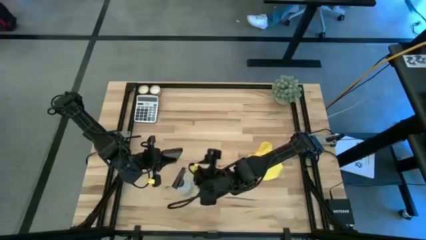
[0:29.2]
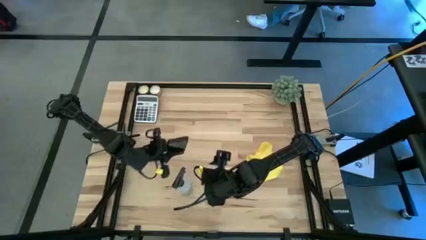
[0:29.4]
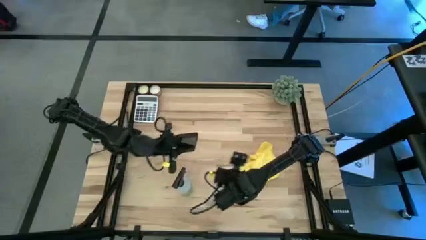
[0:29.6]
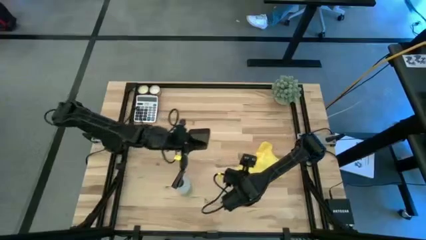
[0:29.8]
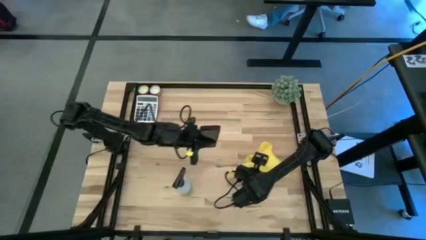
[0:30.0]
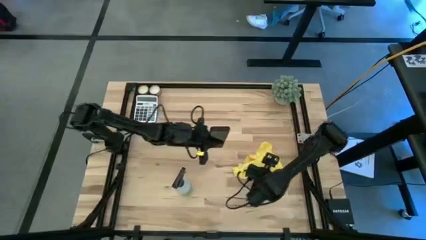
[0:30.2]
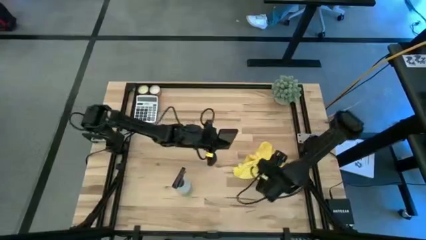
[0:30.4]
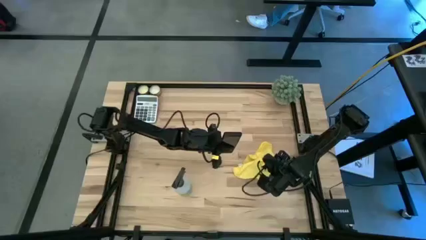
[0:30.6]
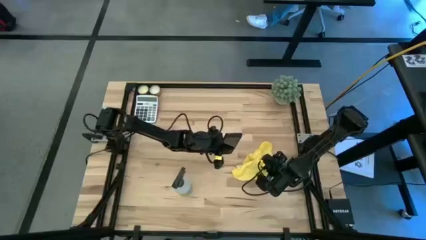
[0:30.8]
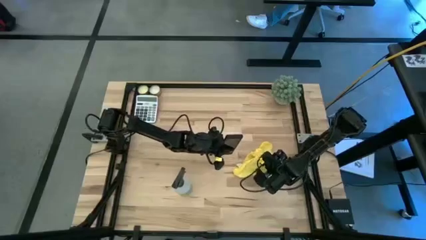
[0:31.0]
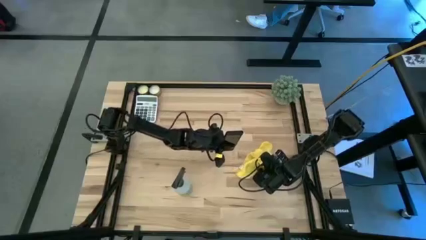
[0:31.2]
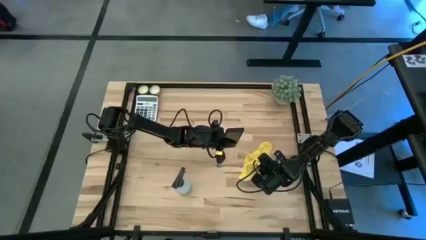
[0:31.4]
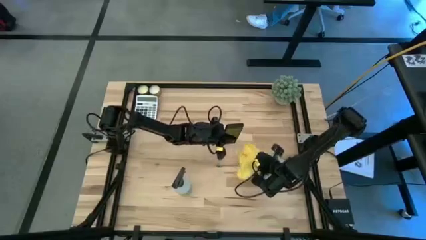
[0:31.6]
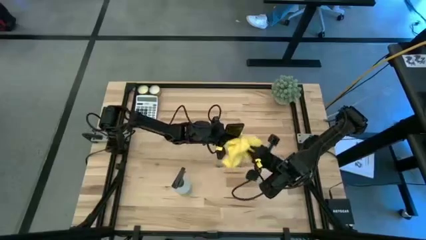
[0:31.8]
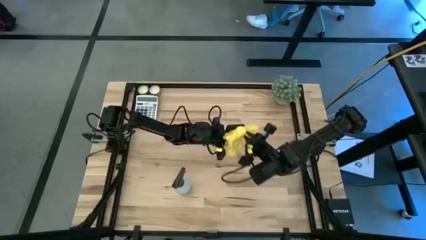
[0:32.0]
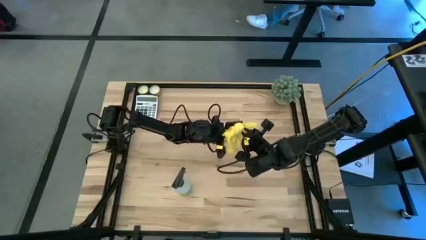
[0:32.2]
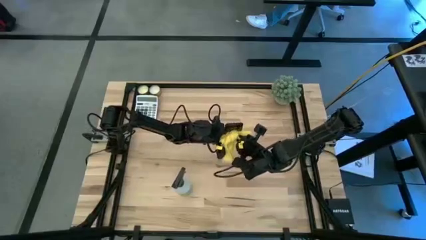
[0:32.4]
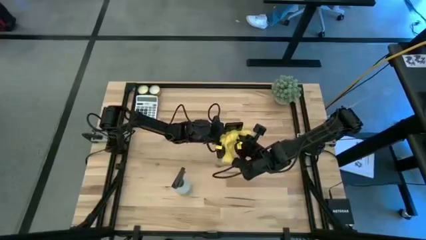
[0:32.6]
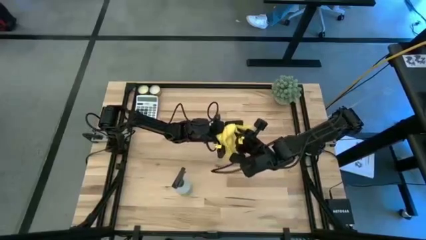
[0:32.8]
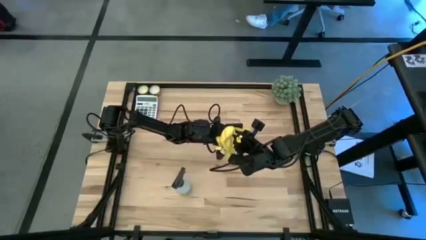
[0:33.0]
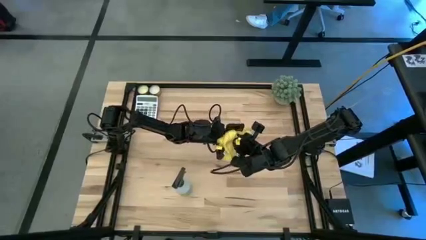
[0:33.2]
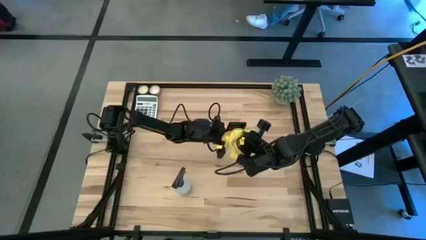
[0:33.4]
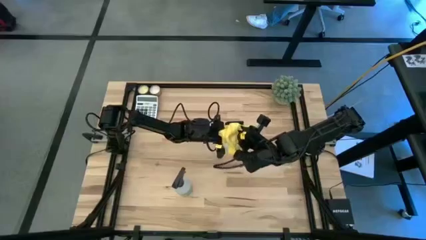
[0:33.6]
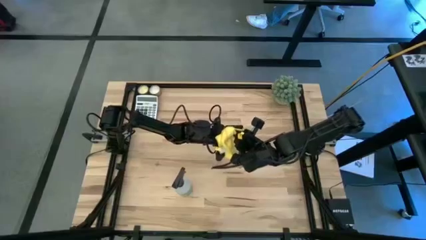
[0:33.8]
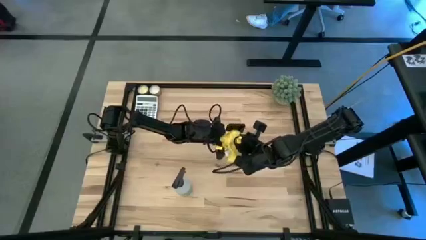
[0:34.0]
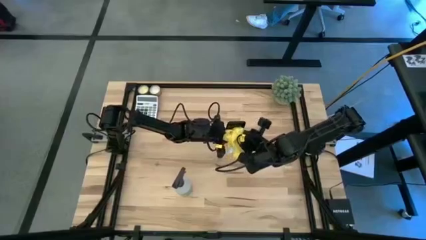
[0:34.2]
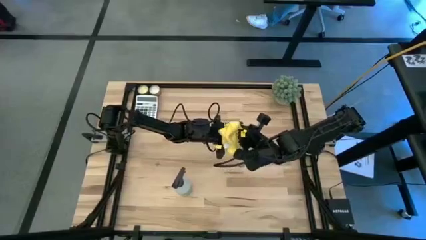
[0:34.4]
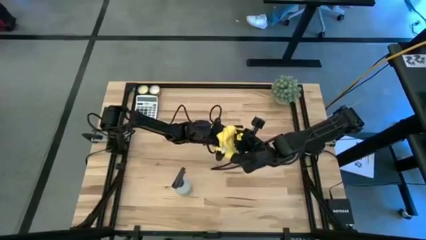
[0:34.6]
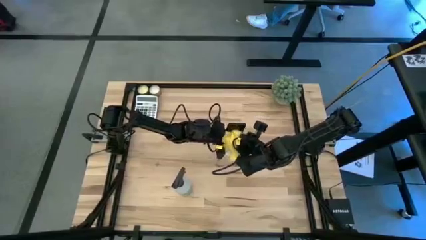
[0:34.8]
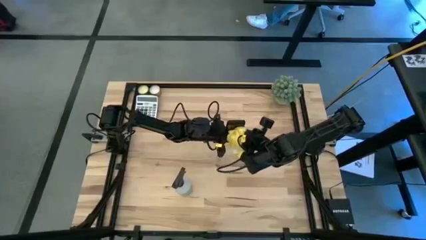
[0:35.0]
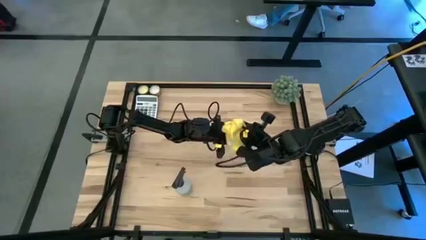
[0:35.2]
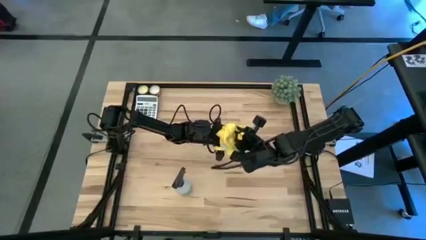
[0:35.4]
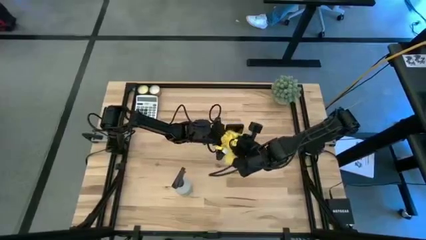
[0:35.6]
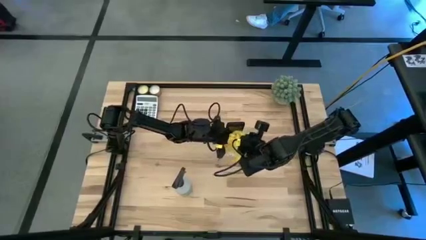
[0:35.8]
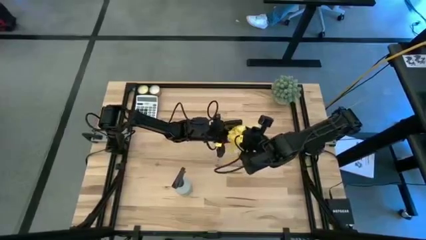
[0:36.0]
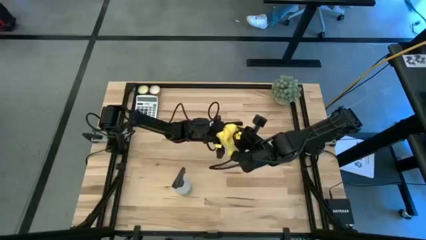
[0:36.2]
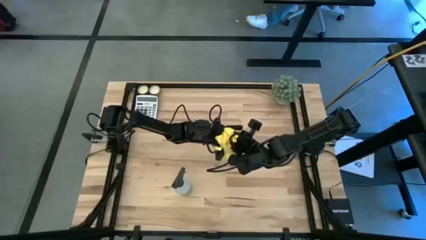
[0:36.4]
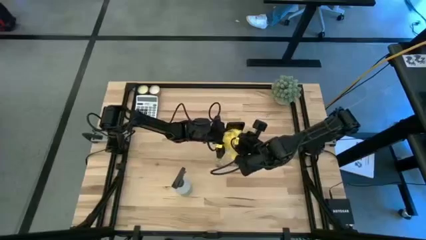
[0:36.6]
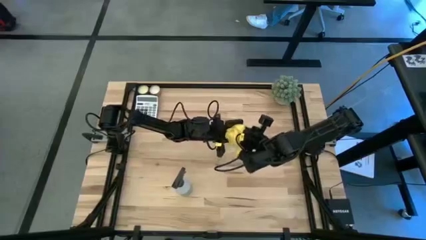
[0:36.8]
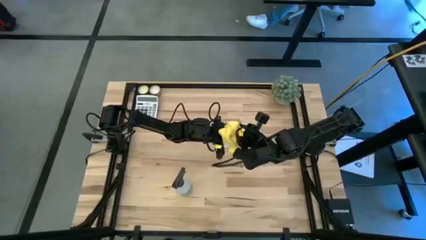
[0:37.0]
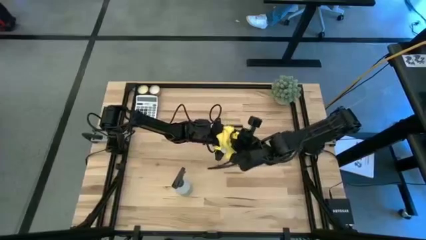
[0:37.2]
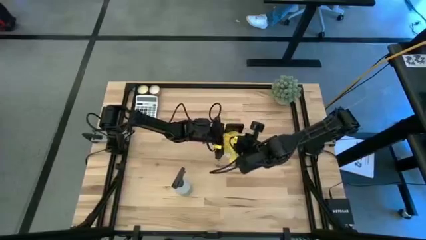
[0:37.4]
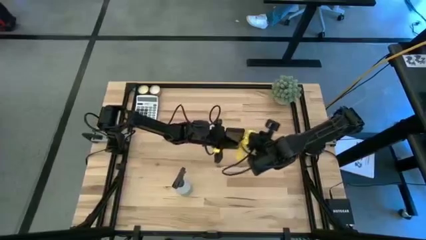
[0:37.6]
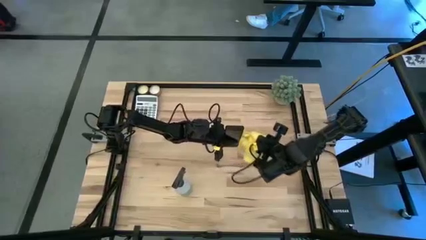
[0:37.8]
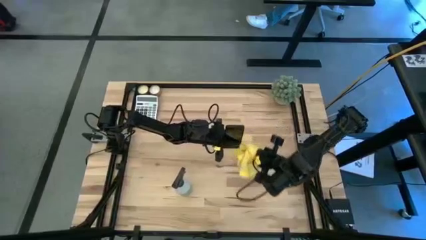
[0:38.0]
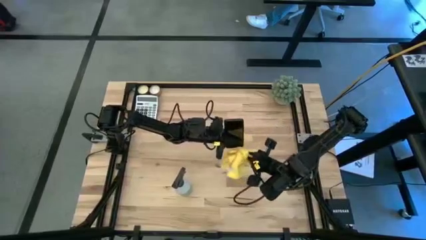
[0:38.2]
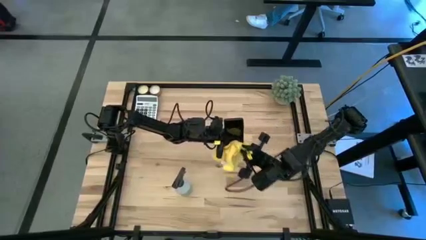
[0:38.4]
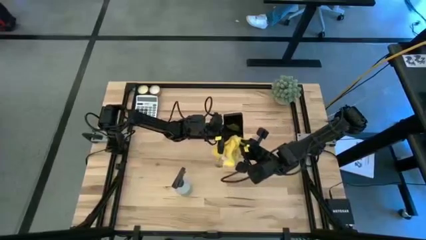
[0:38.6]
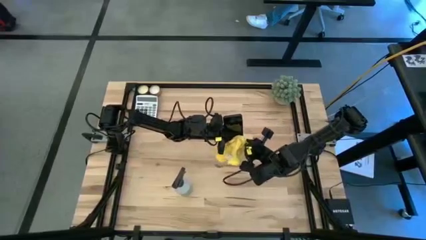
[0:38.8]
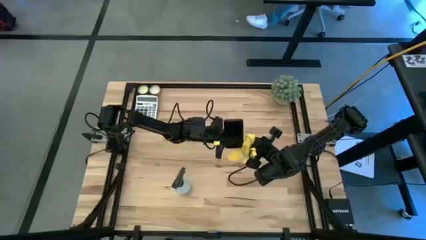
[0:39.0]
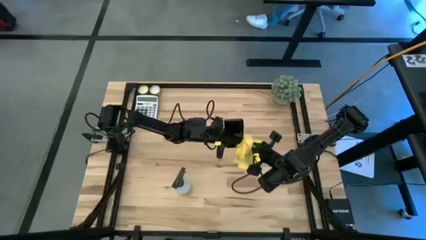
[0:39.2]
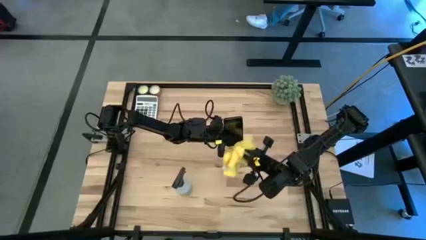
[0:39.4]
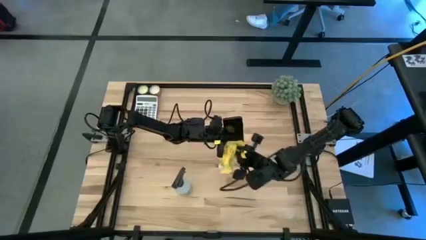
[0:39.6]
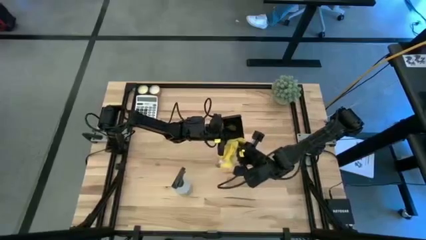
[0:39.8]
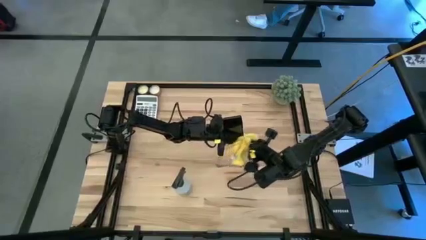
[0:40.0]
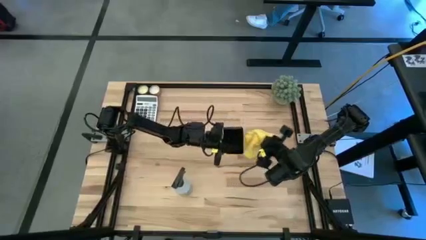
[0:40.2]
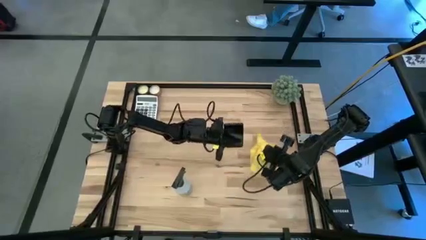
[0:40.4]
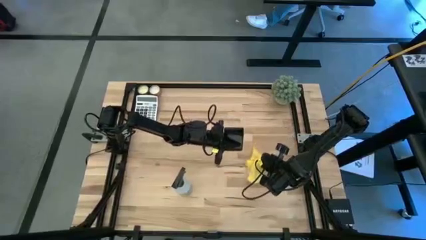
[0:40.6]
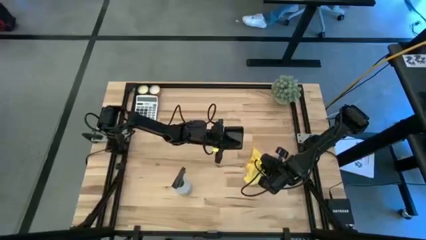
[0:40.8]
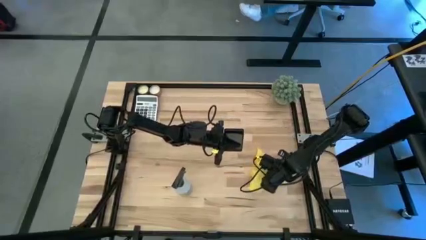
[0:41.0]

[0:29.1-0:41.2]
Task: Apply microfiber cloth
Wipe the screen of the black cellphone with the yellow microfiber cloth
